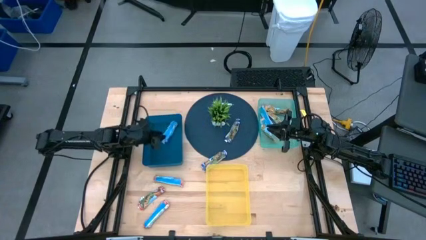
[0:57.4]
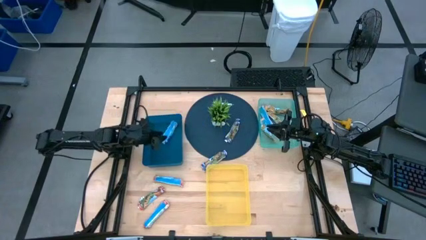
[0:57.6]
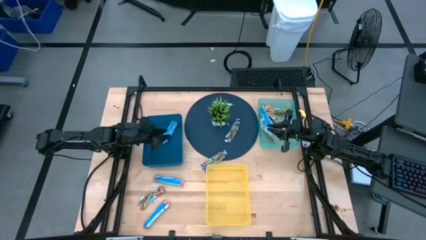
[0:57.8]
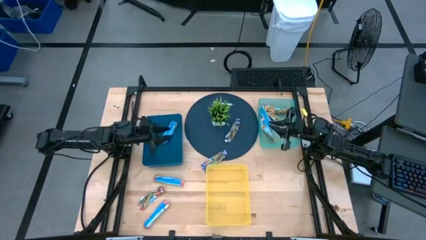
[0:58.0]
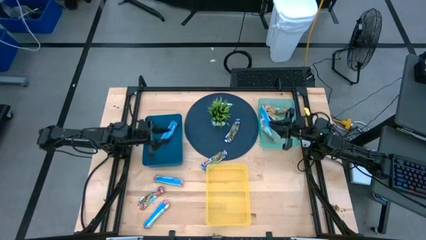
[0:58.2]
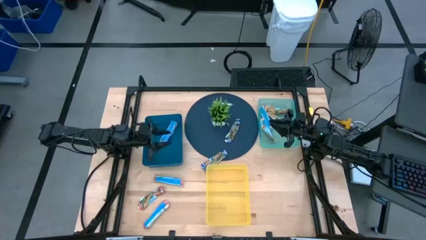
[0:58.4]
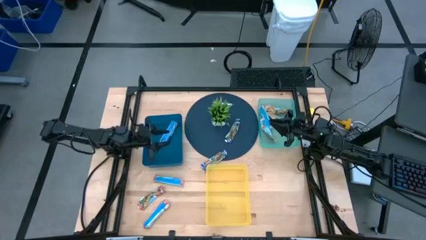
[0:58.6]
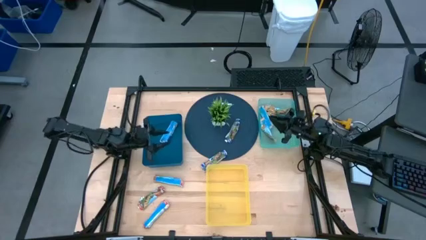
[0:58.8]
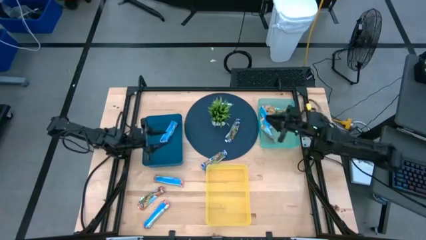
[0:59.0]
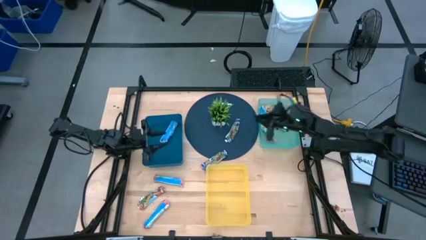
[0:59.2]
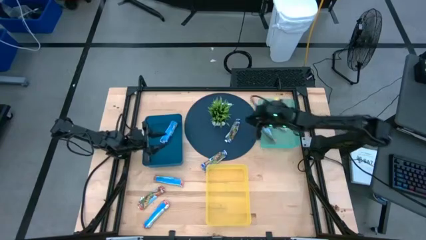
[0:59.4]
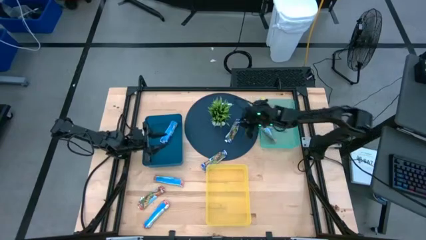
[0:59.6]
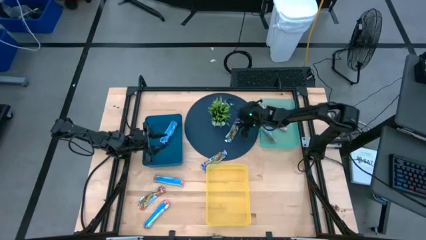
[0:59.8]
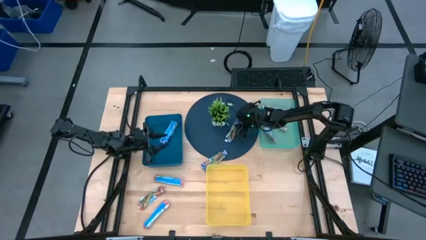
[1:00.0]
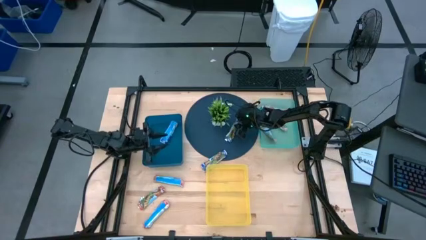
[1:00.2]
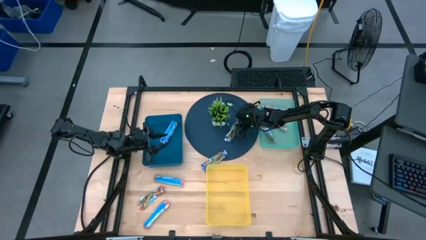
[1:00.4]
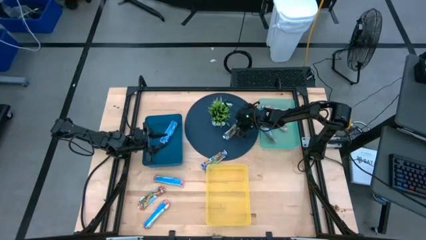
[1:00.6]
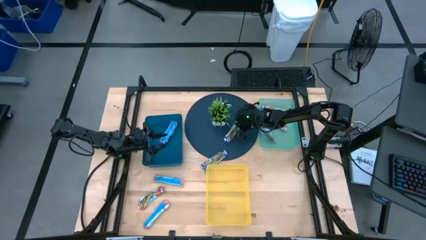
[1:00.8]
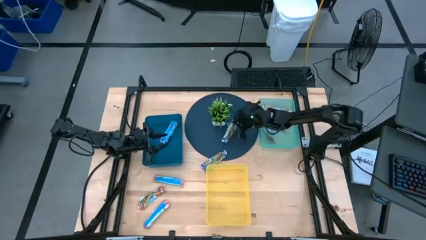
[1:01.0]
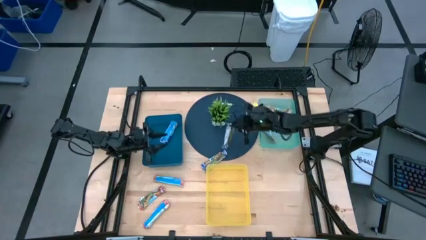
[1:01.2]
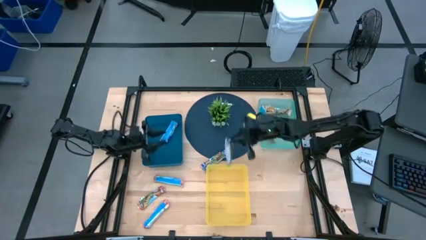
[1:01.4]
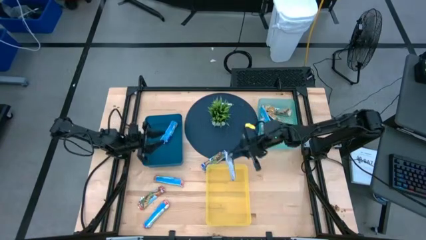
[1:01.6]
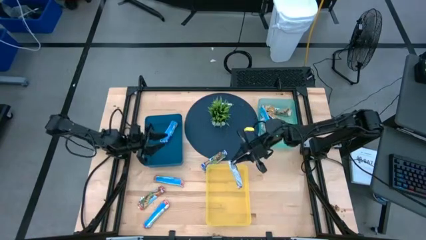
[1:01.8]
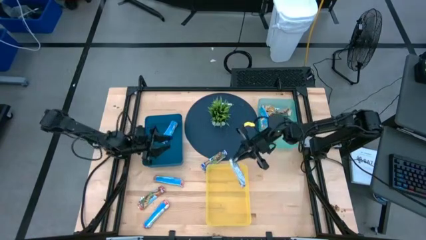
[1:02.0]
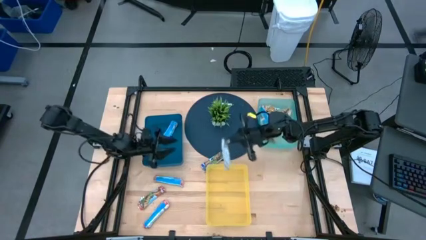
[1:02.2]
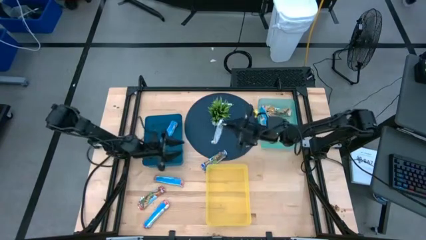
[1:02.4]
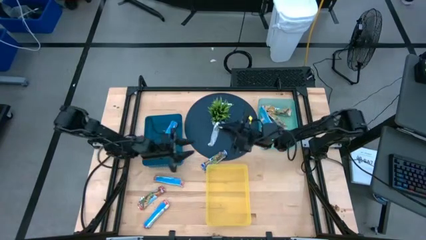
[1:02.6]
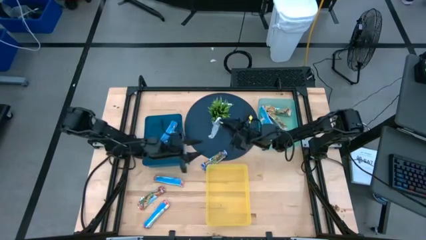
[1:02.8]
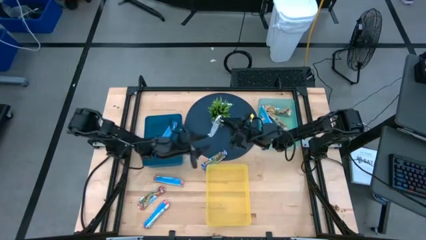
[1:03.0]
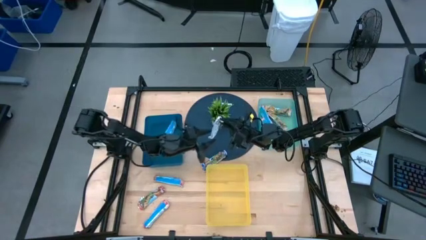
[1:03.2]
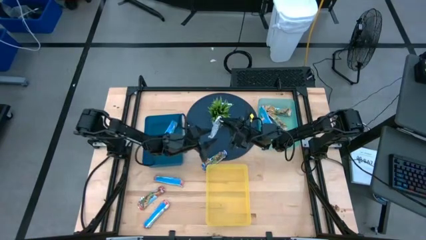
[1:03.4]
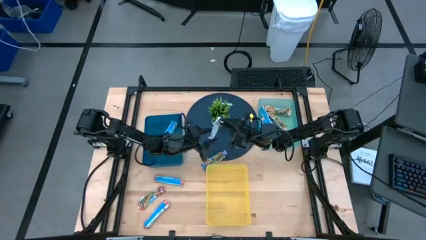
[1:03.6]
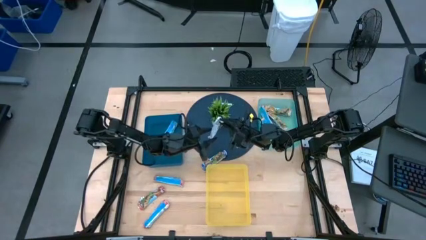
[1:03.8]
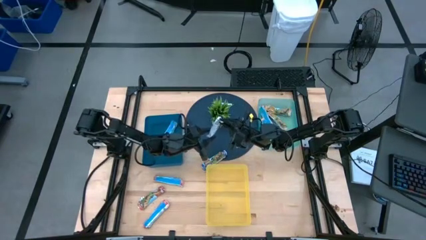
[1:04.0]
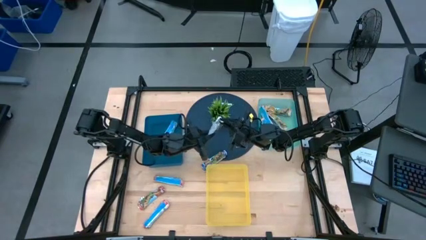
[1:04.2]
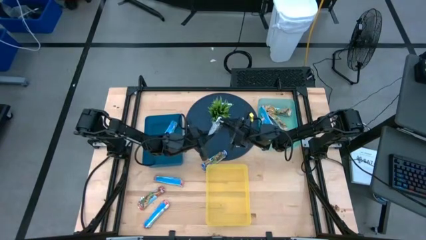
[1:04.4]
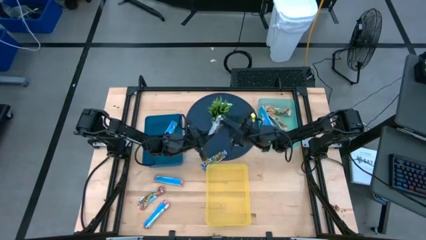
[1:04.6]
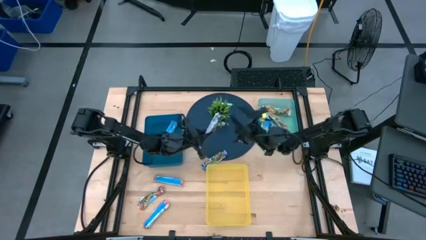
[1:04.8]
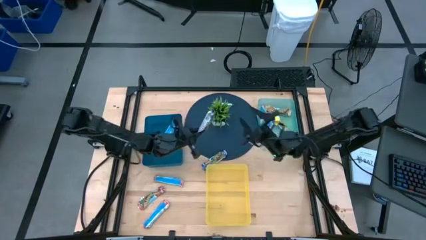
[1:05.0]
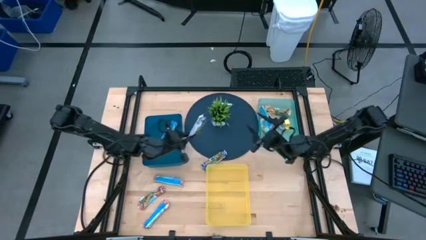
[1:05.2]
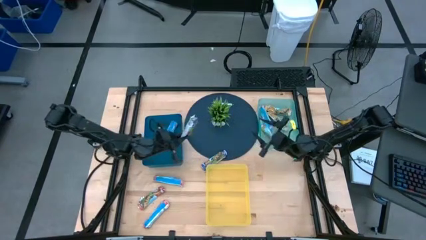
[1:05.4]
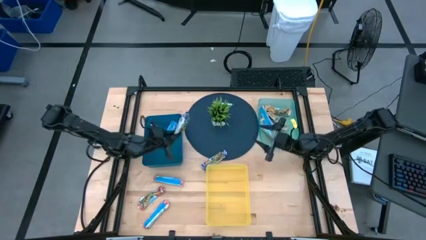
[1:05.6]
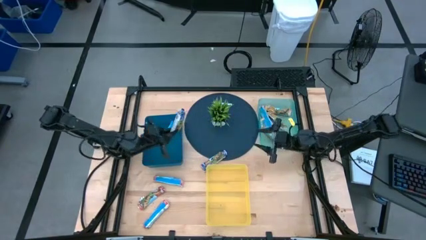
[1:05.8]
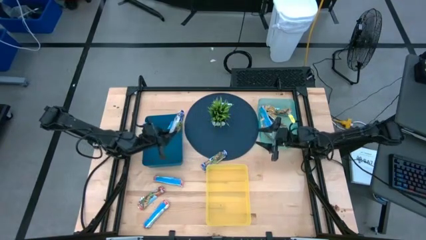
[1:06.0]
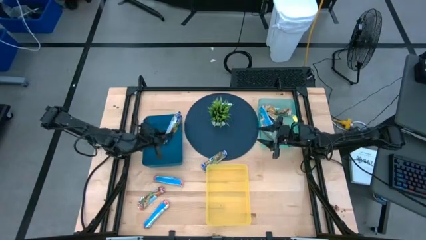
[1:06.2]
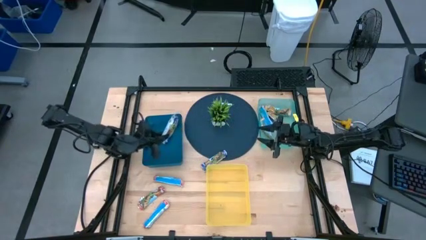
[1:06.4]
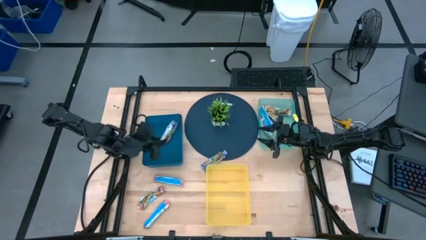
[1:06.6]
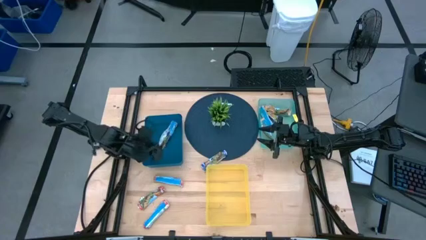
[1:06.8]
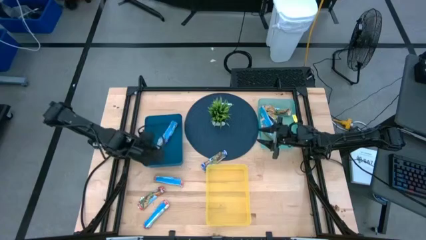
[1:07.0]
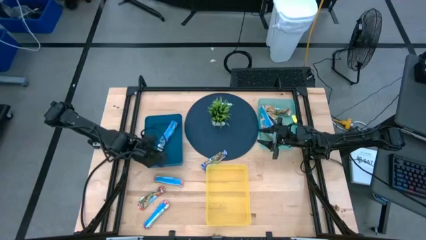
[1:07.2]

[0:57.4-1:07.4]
Task: Pick and place Granola Bars by type
Put the blue granola bar into the blue bin
